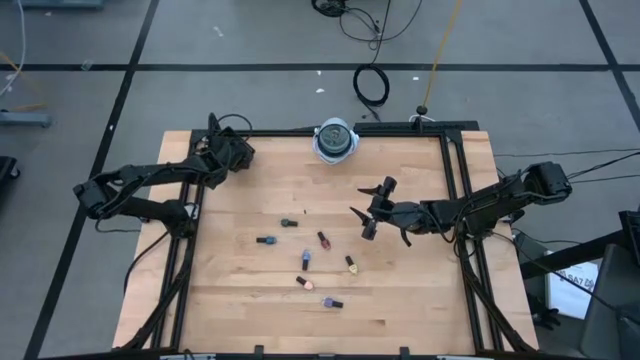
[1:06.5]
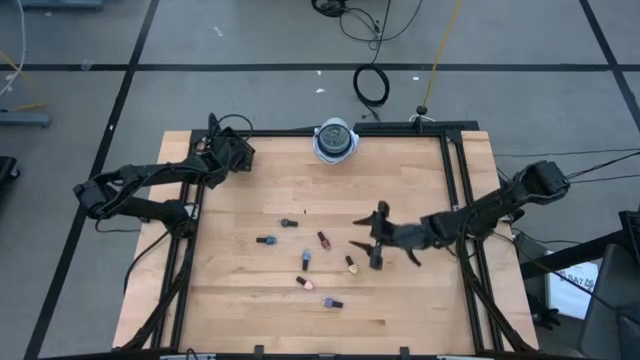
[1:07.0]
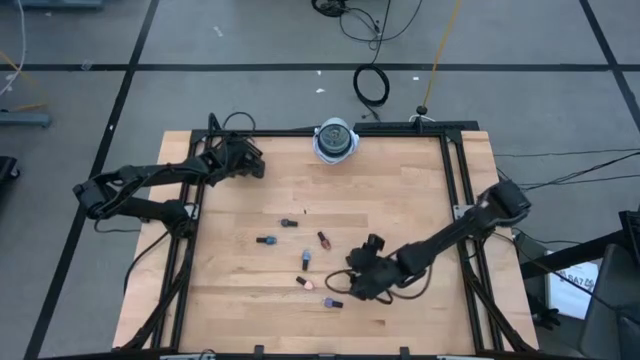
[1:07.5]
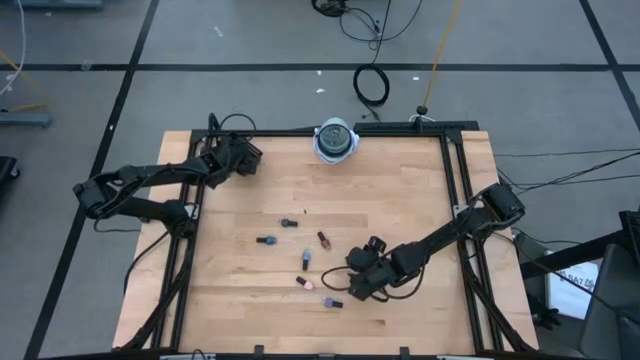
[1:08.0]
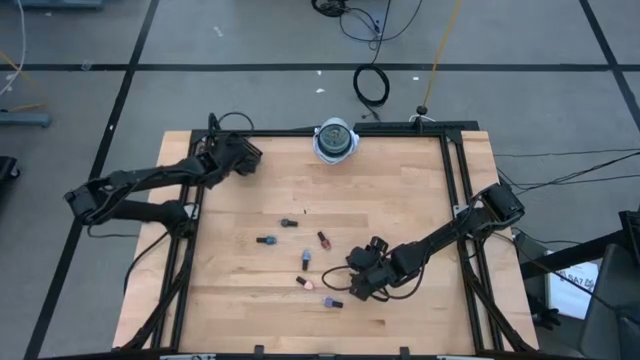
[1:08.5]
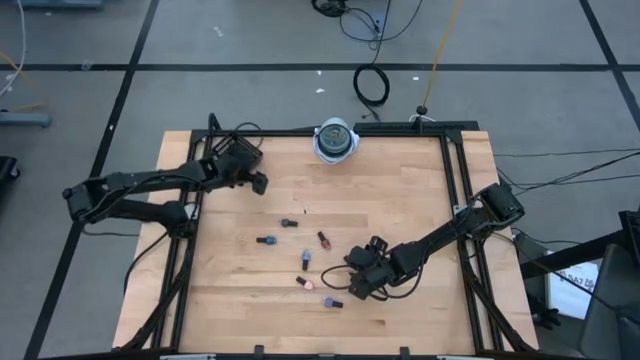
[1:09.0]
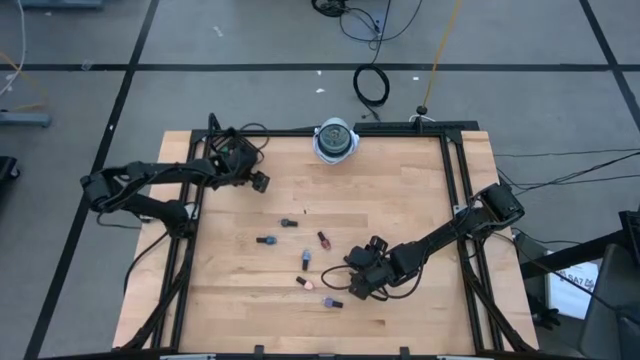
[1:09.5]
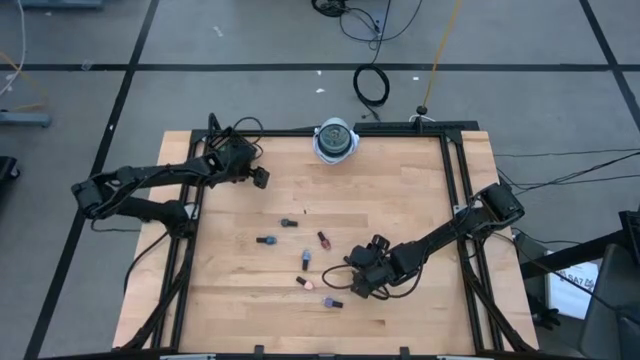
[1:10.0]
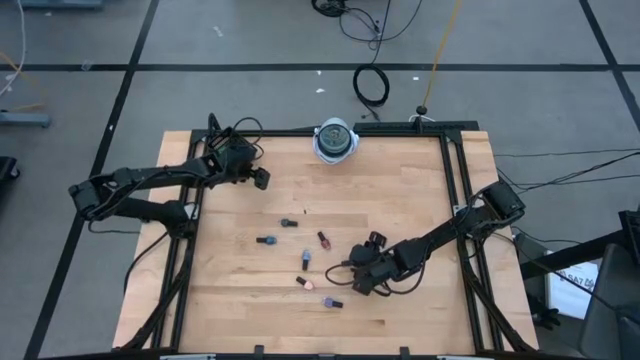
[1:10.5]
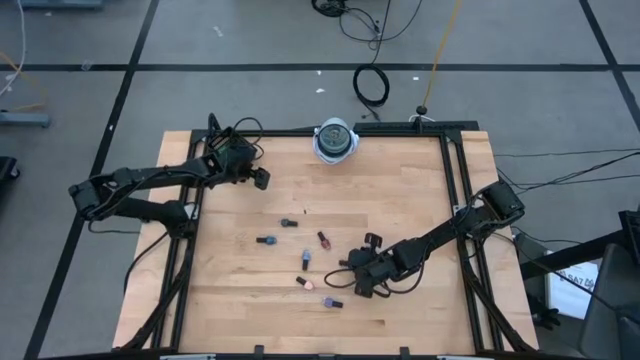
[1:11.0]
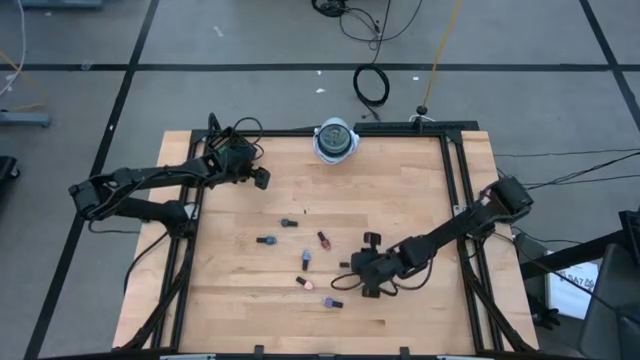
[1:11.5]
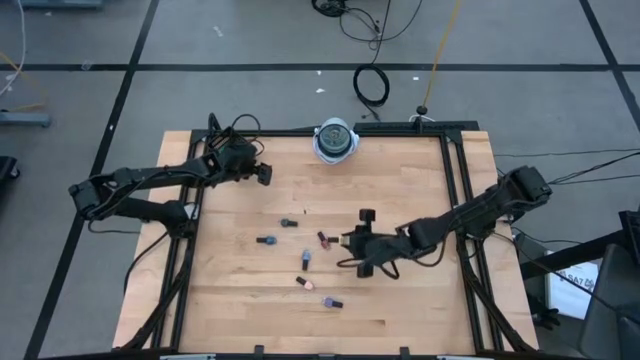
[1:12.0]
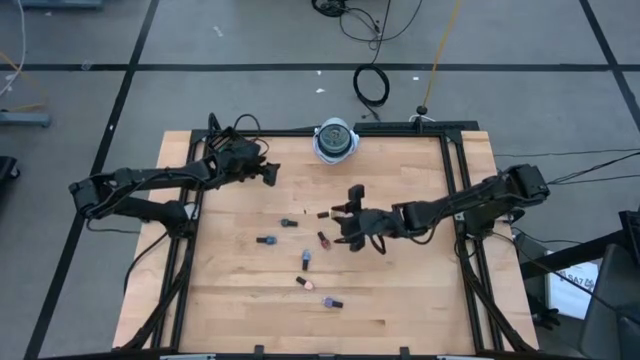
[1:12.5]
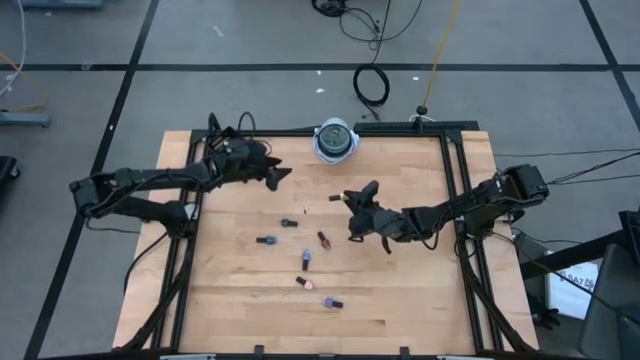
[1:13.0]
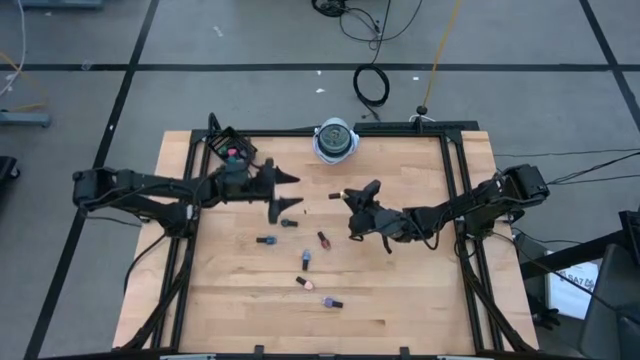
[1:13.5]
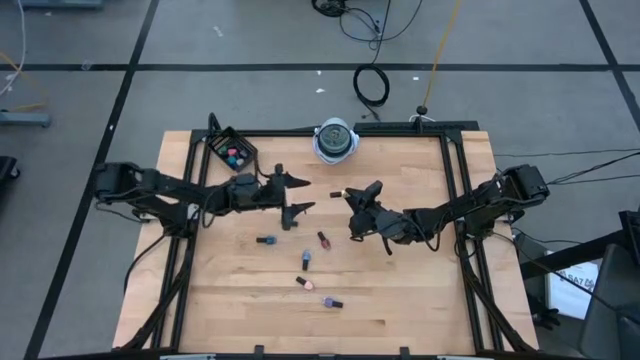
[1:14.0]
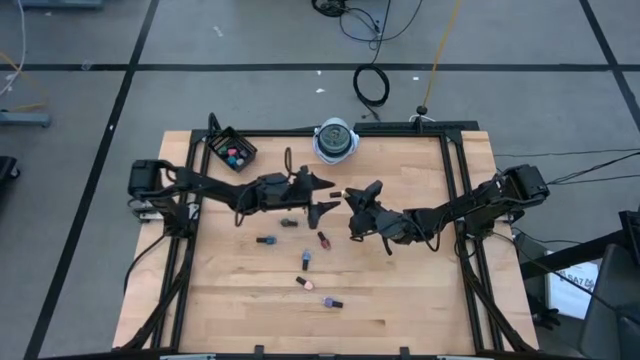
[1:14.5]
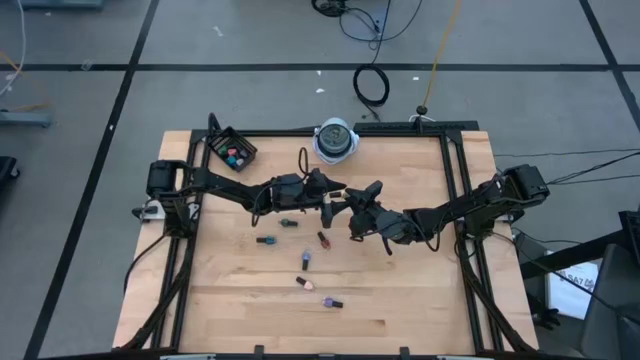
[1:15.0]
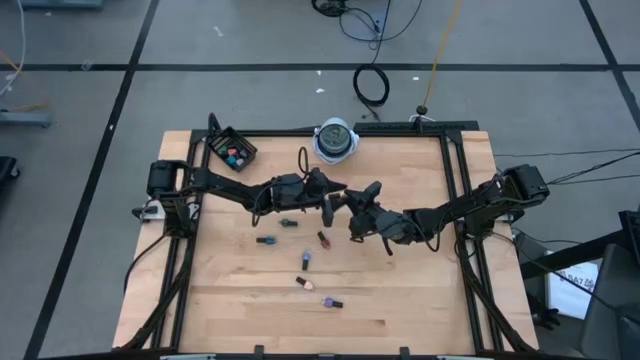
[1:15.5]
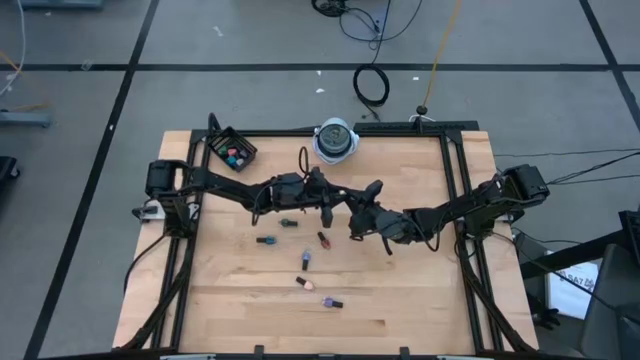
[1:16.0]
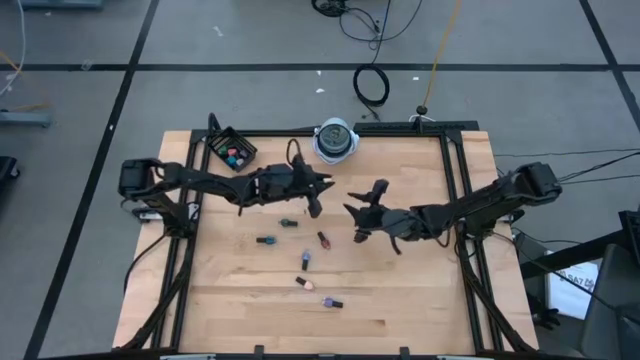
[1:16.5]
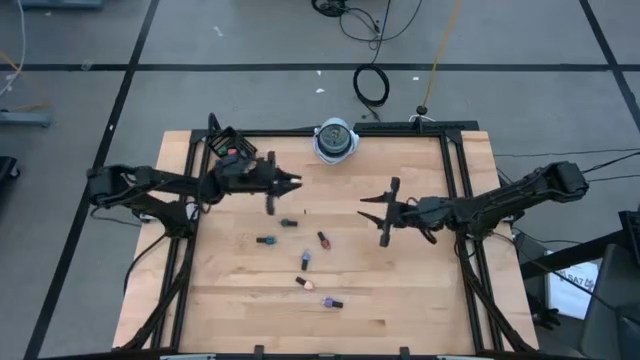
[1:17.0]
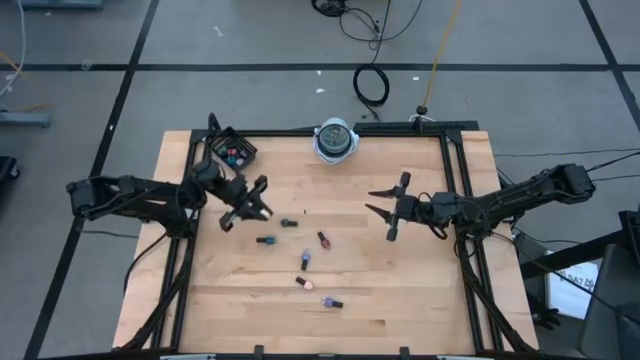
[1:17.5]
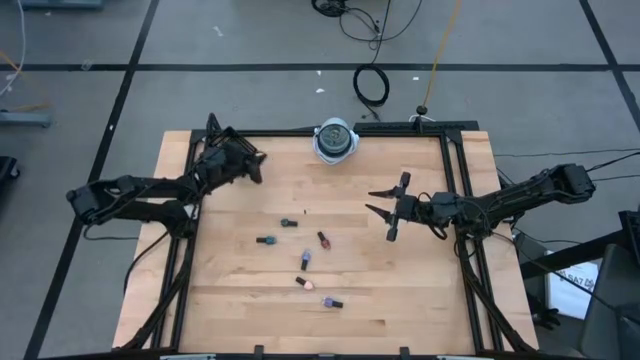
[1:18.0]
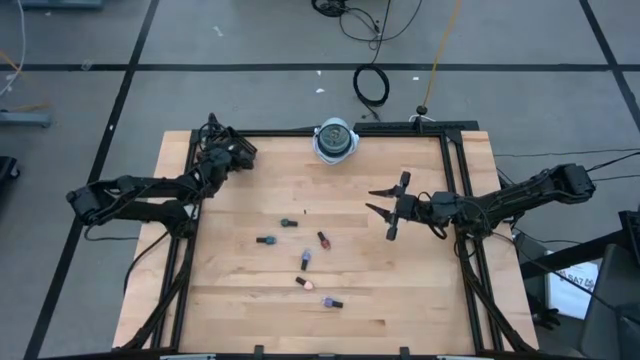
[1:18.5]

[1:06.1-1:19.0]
Task: Pick & Place Nail Polish
Put the yellow nail polish bottle into the black bin
